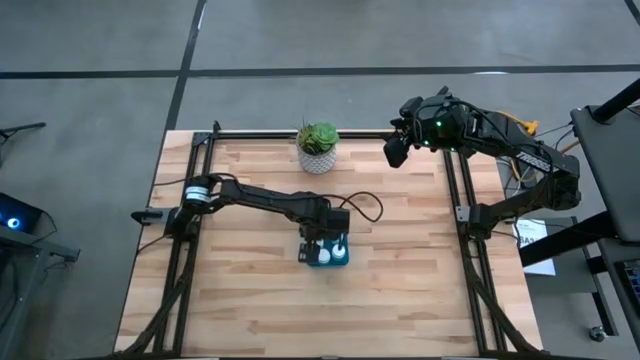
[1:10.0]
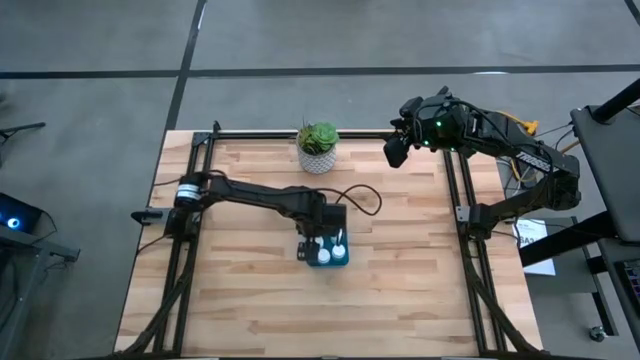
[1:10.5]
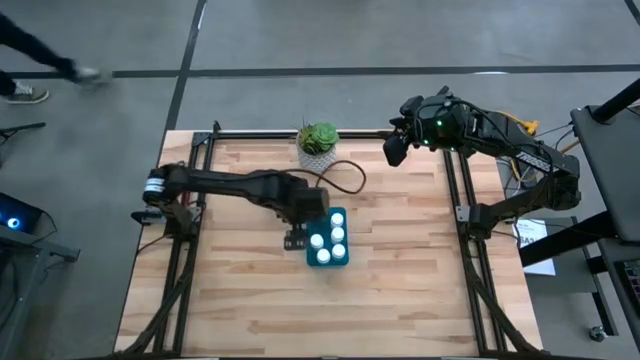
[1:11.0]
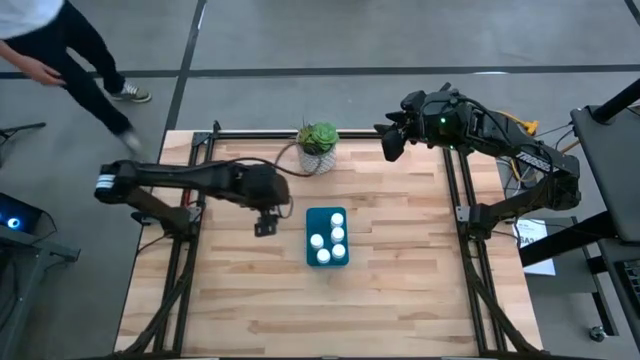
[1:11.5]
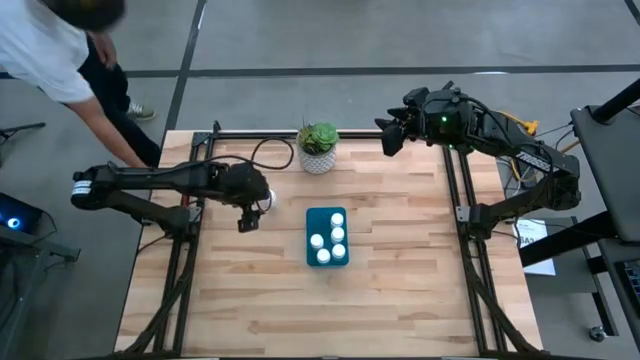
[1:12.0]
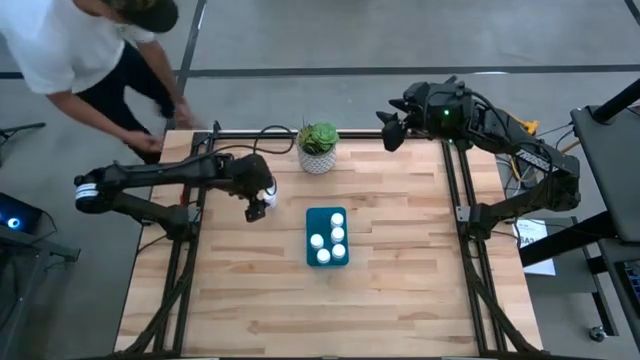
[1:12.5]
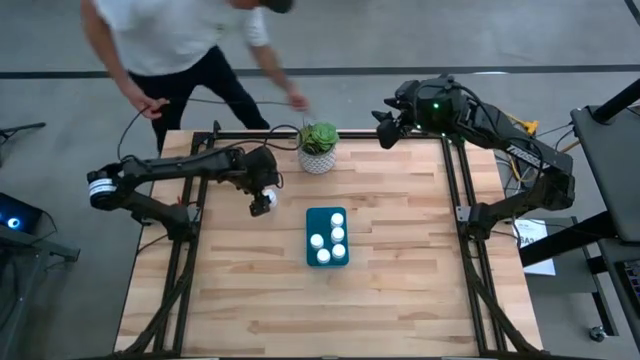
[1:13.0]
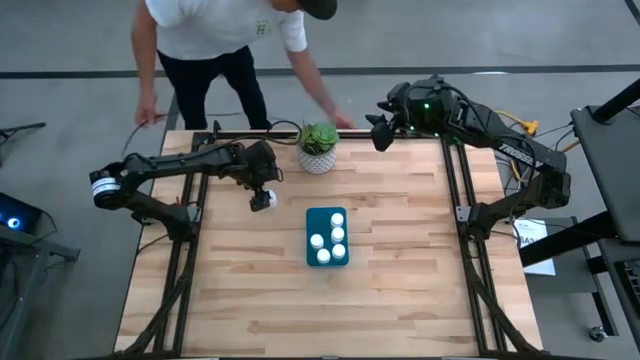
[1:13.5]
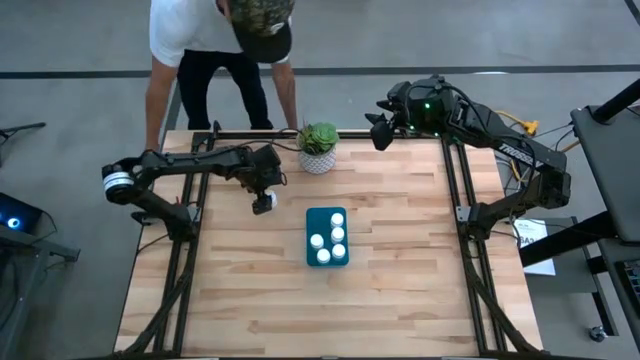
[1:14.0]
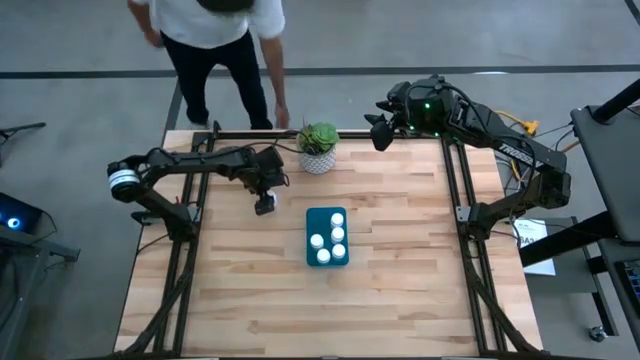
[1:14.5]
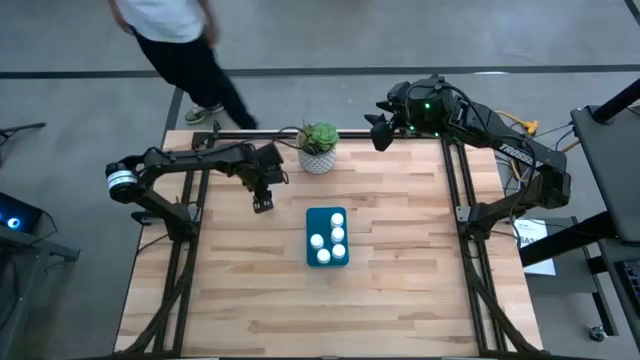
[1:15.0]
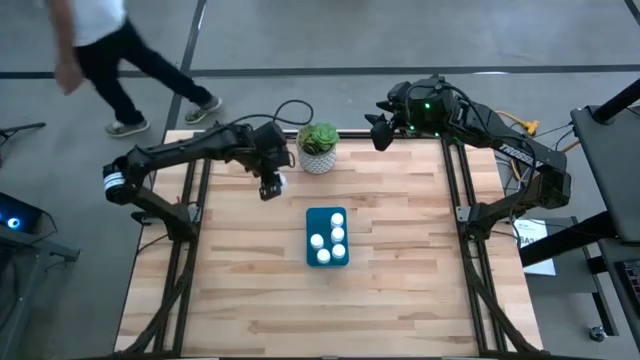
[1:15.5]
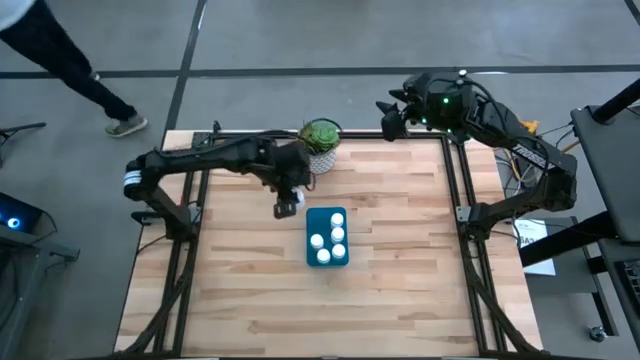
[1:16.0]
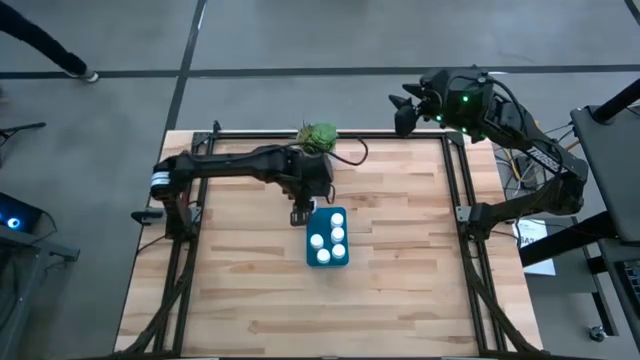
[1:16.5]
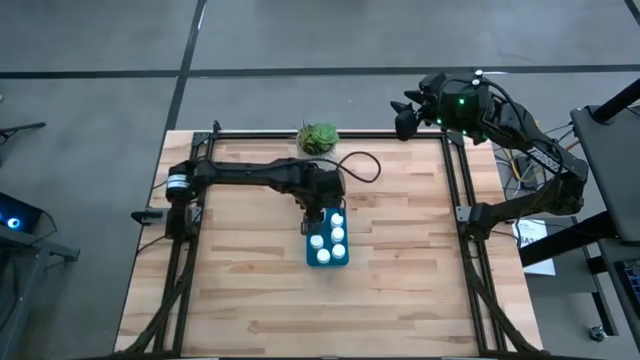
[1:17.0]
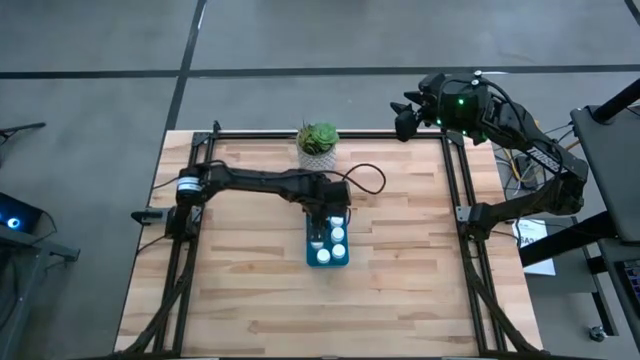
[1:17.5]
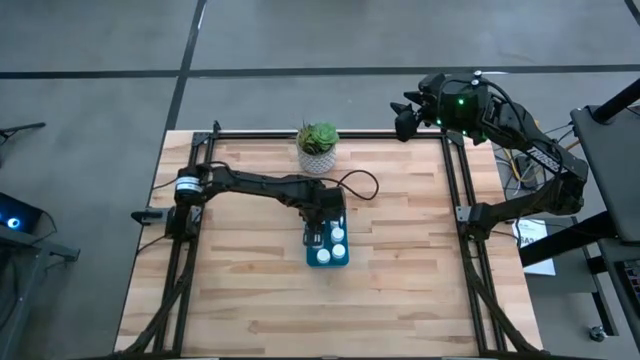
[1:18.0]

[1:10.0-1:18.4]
Task: Pick and place pill bottles into a basket
Put the white medicine bottle into the blue bin

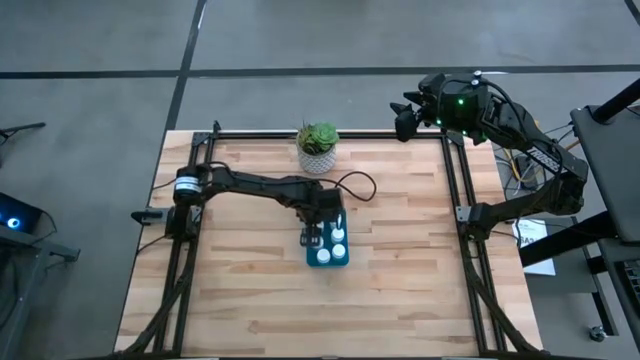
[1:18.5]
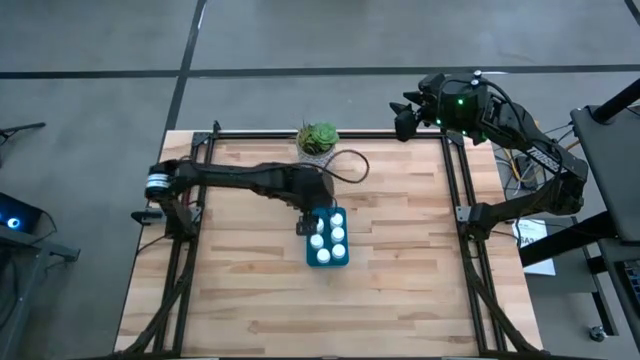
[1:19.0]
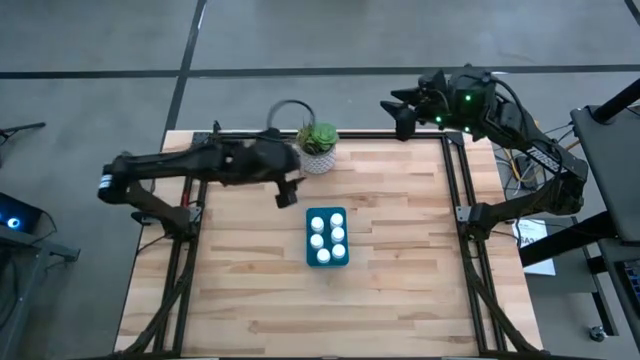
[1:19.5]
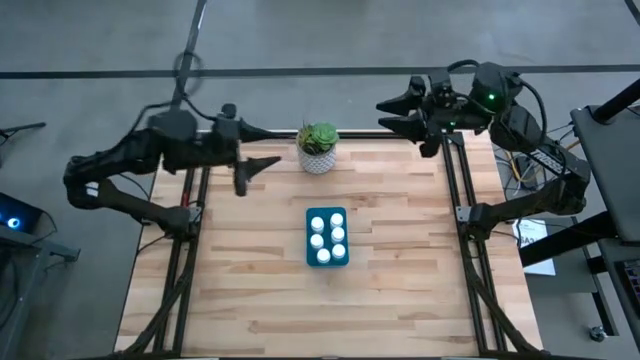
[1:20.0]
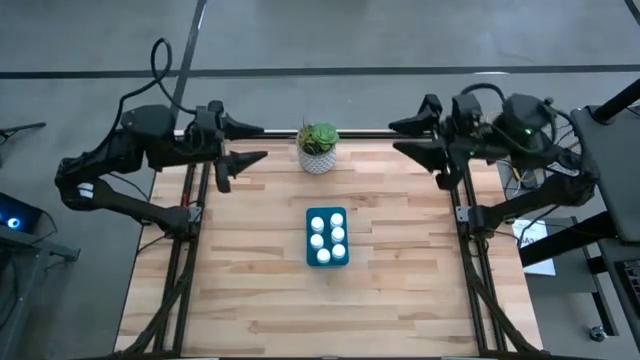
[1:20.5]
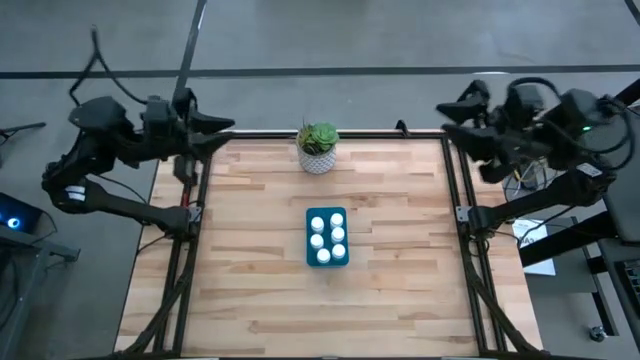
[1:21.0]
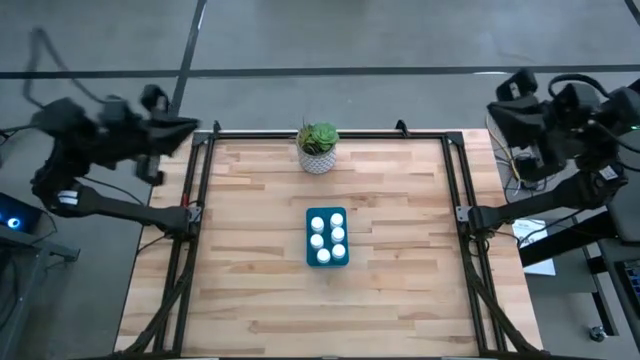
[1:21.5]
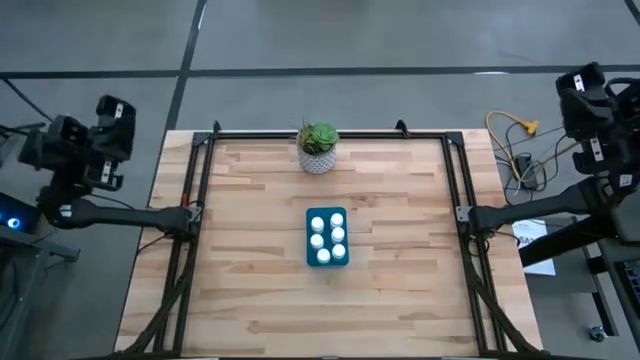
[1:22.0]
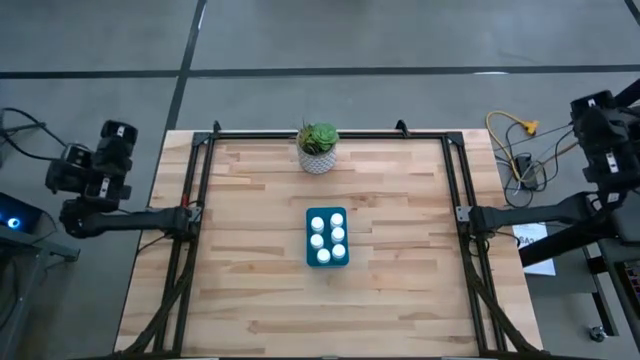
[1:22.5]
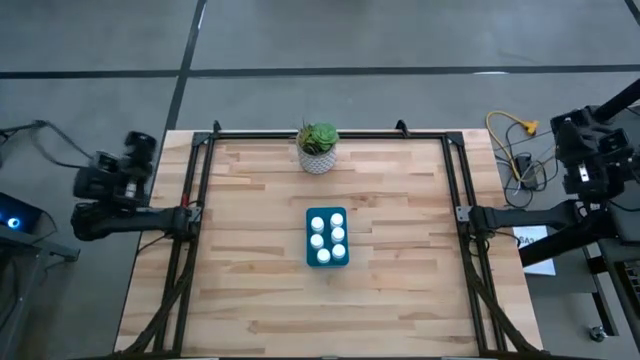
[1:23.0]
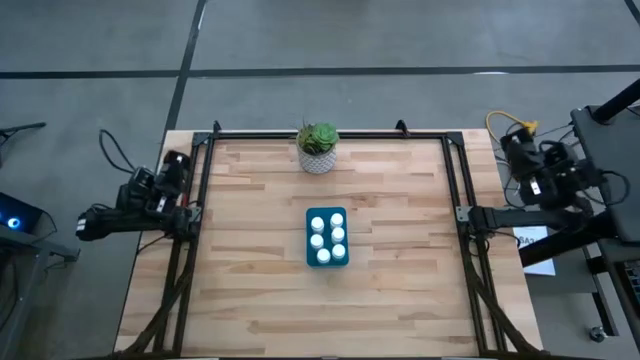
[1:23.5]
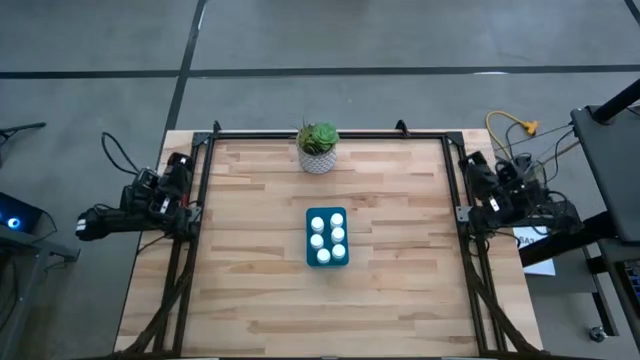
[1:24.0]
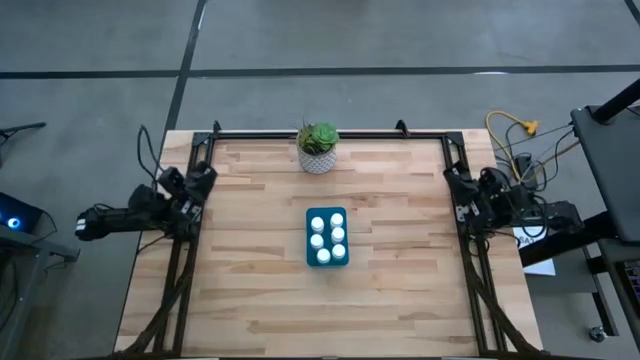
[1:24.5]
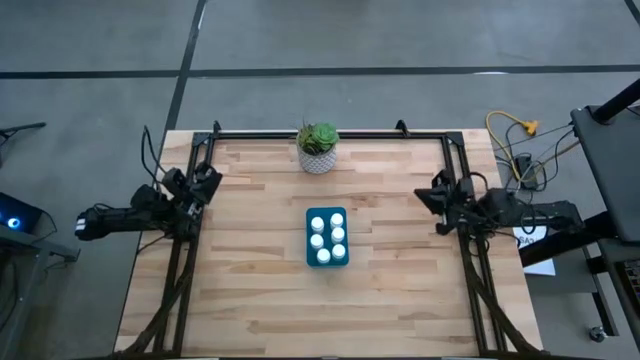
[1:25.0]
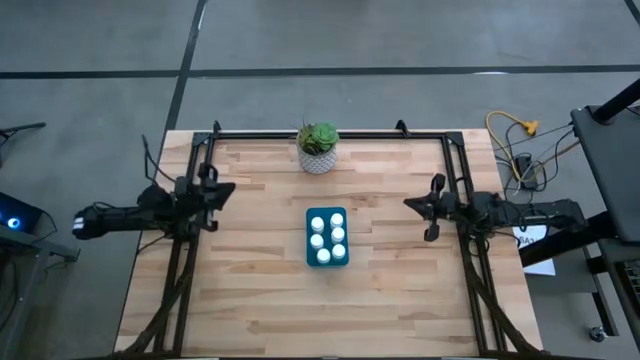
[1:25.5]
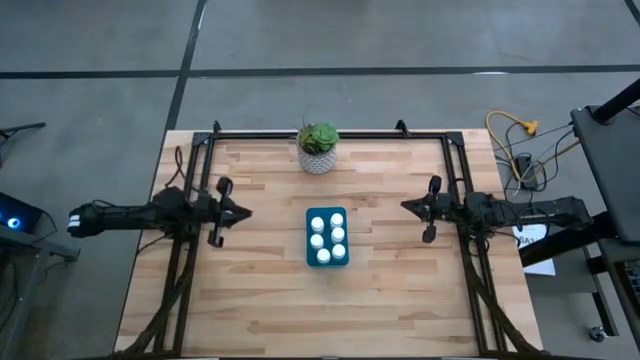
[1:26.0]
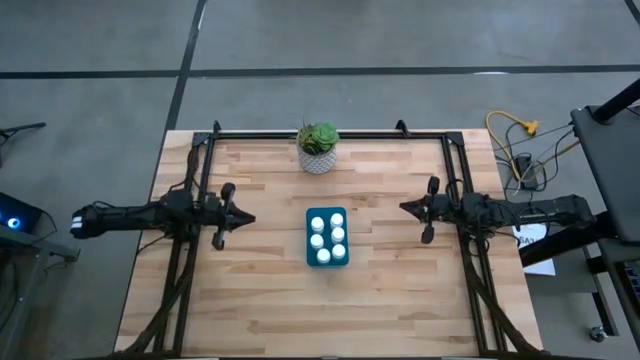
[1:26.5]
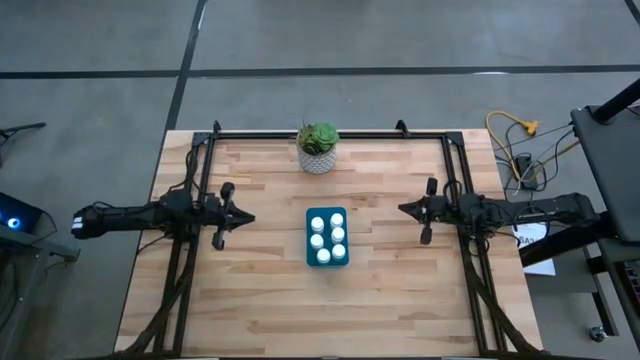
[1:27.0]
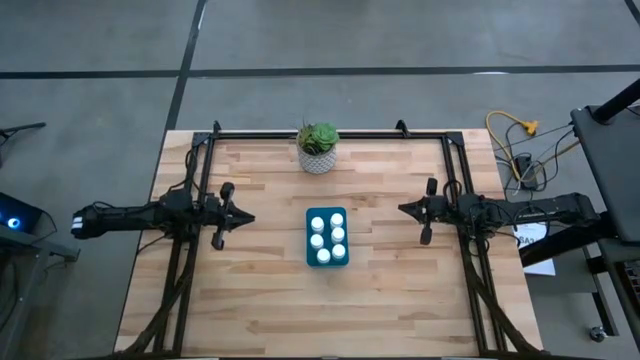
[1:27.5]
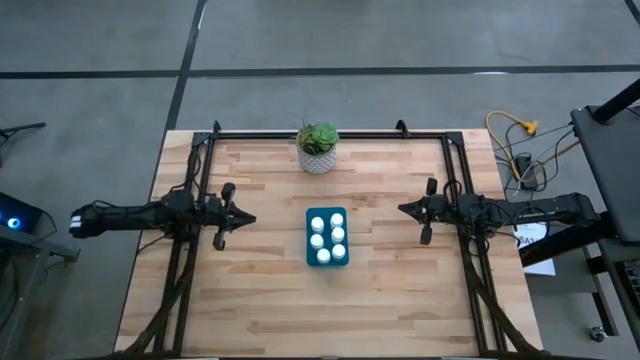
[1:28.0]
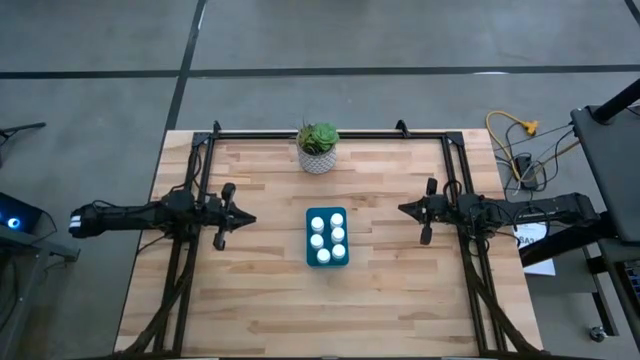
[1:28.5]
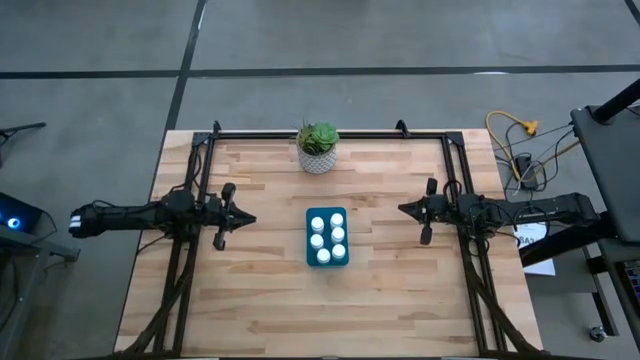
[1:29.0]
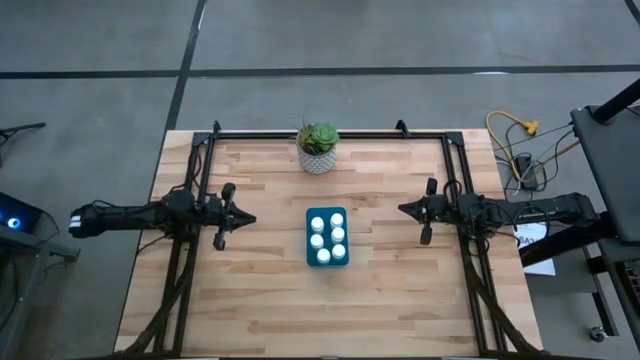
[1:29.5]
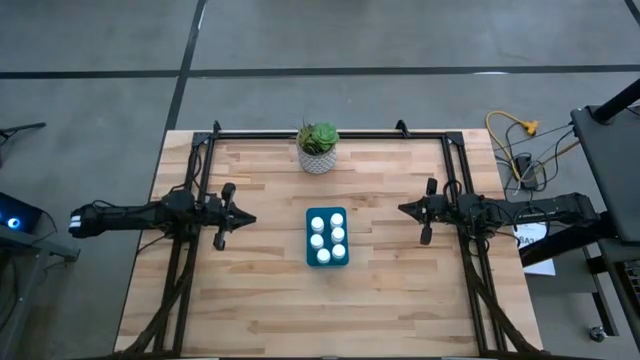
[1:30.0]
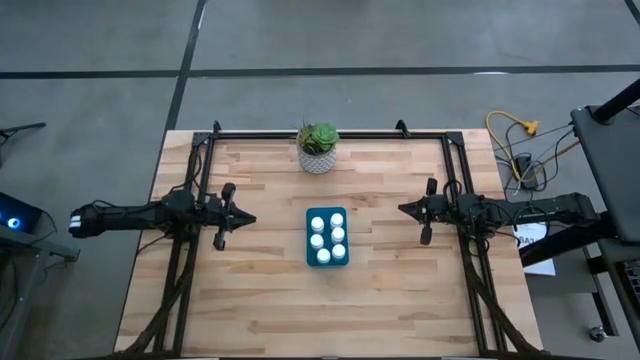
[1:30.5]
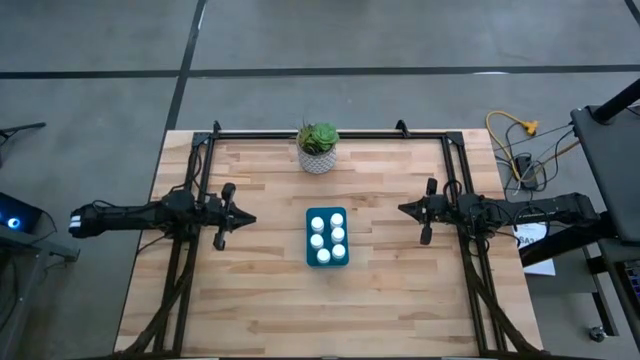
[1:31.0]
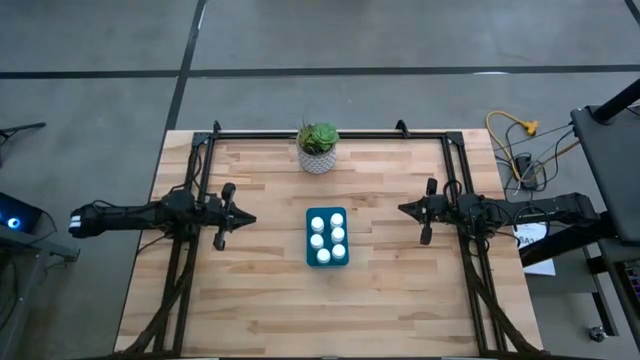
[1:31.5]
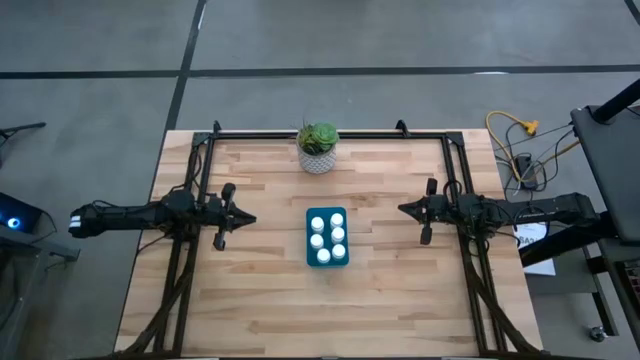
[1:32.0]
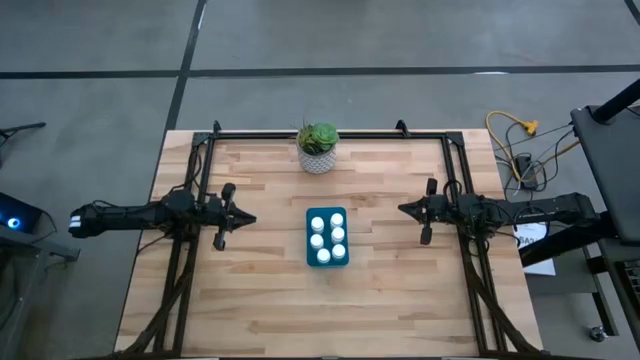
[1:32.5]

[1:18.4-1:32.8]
Return to Home Position
